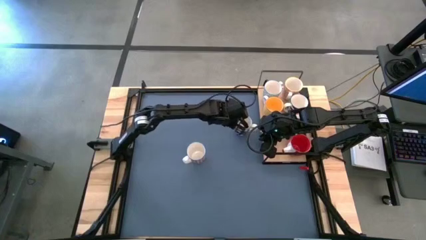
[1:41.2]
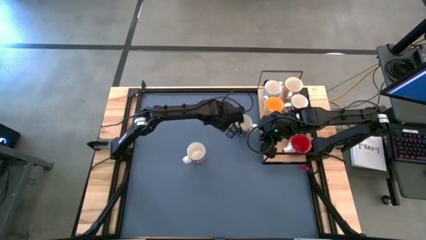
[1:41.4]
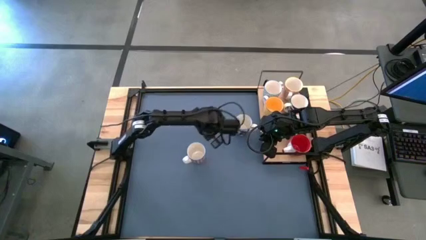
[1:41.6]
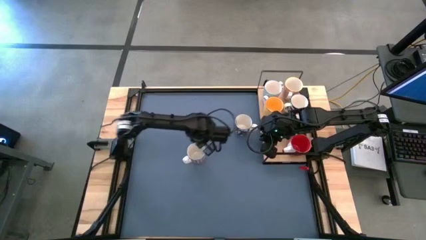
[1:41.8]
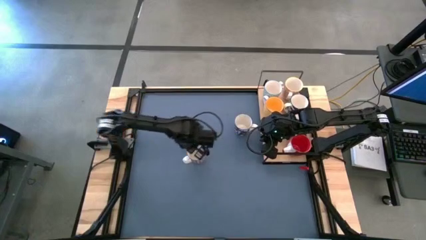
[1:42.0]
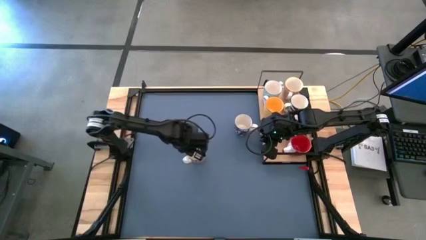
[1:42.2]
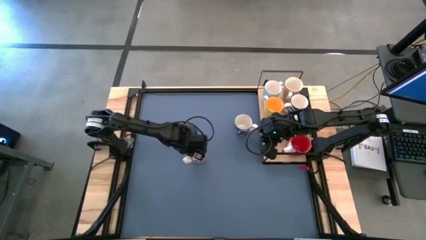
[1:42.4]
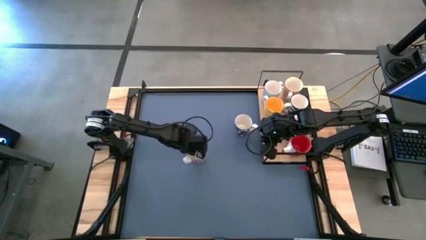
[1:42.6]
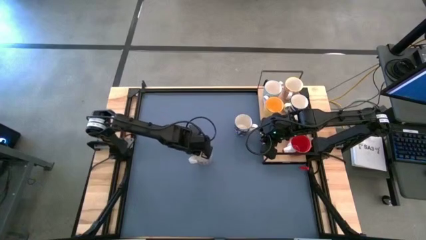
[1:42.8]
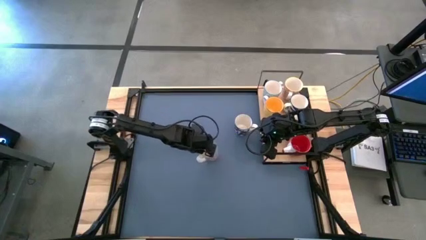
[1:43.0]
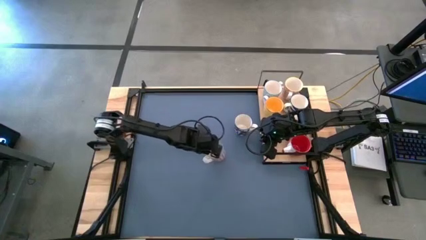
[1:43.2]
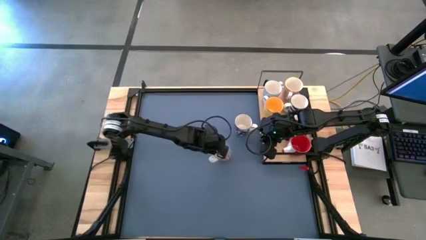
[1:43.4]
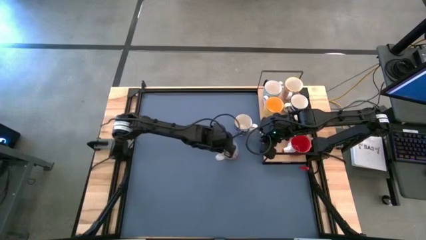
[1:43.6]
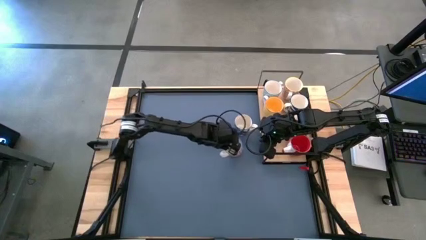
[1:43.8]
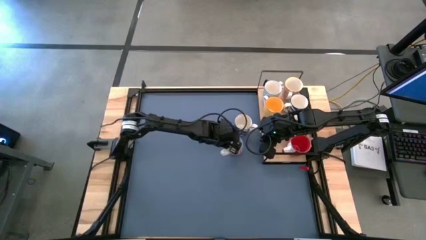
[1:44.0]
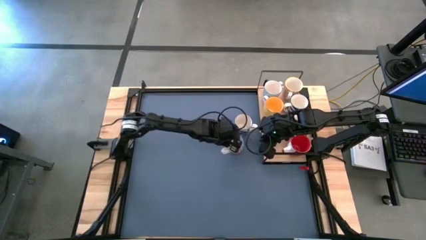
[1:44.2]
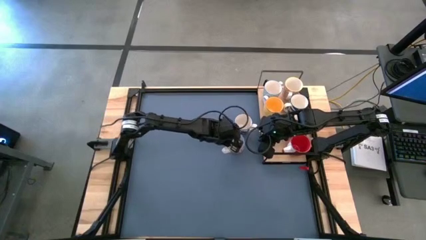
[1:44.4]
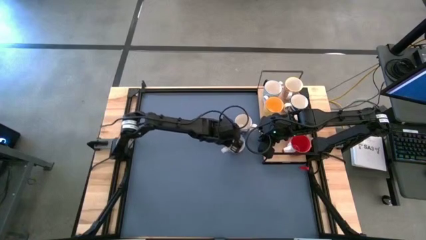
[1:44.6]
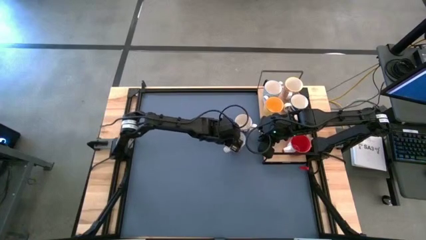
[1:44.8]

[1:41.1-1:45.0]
Task: Place coffee mugs
Move the red and white cup to the top right of the table

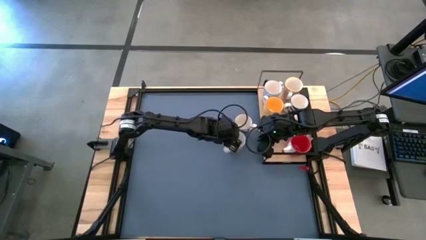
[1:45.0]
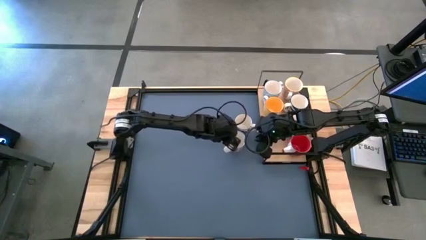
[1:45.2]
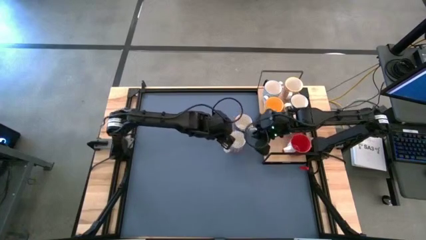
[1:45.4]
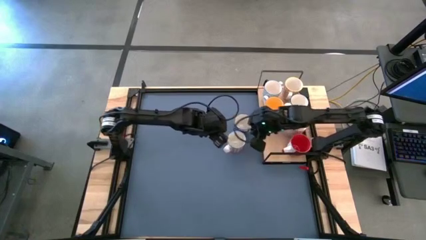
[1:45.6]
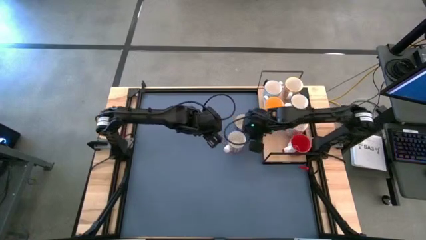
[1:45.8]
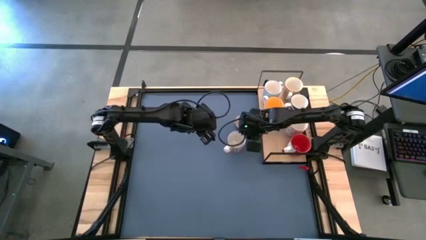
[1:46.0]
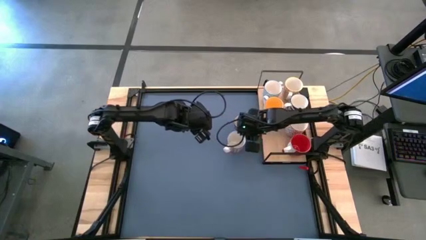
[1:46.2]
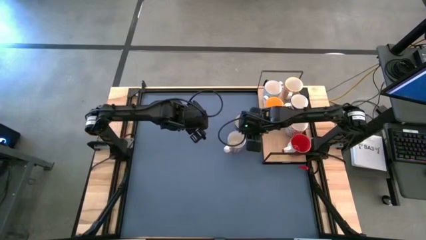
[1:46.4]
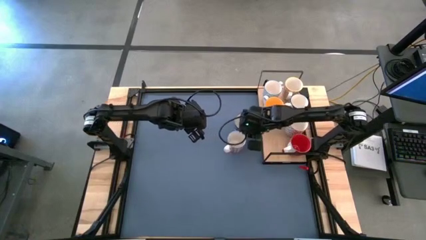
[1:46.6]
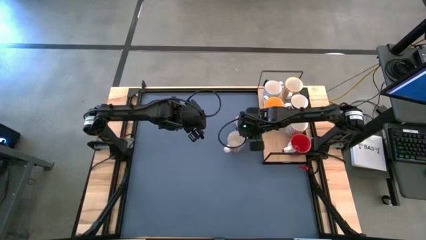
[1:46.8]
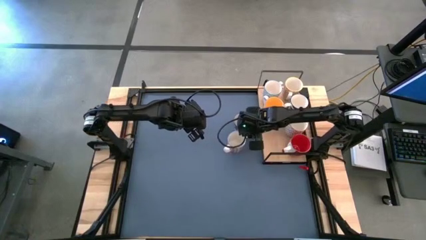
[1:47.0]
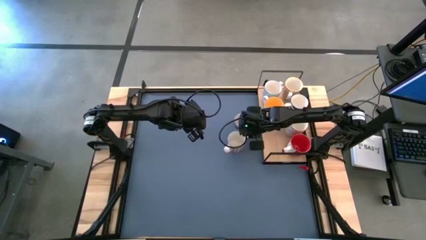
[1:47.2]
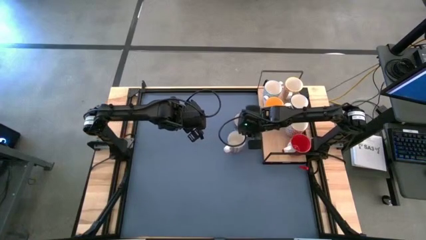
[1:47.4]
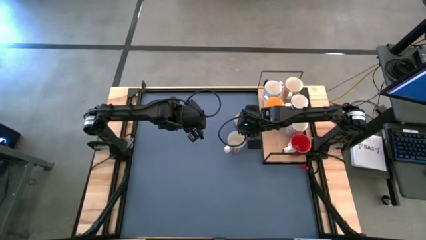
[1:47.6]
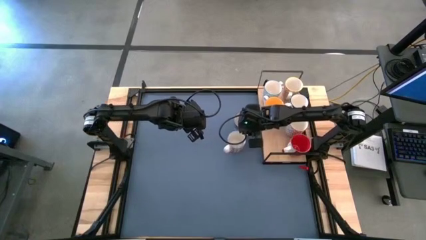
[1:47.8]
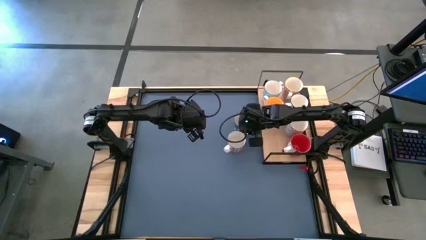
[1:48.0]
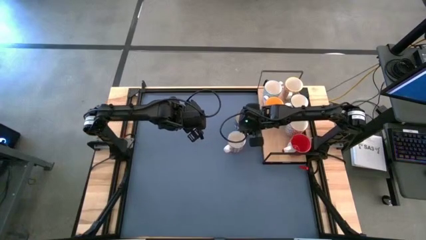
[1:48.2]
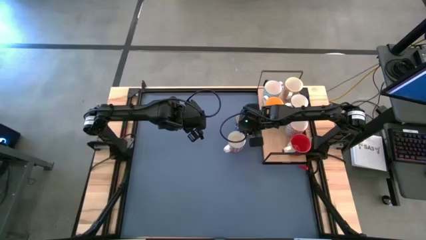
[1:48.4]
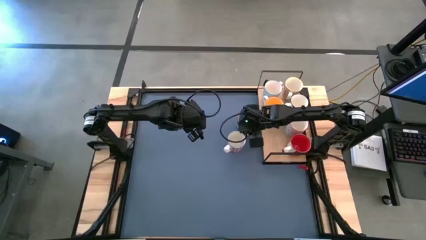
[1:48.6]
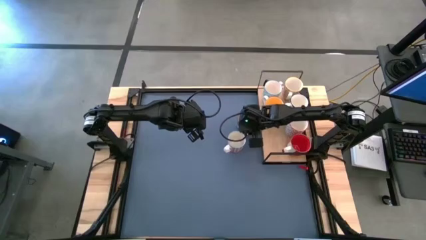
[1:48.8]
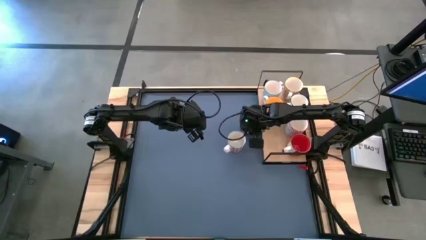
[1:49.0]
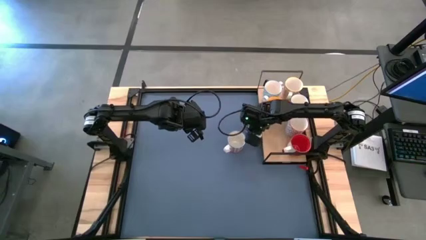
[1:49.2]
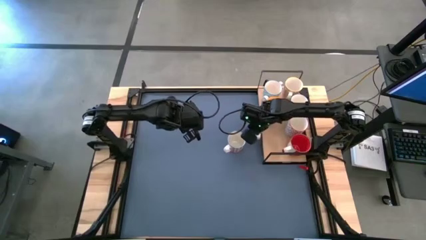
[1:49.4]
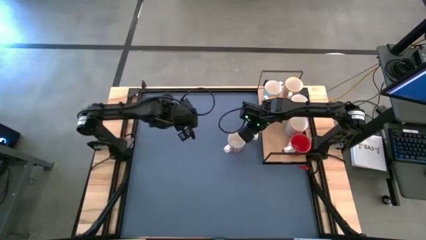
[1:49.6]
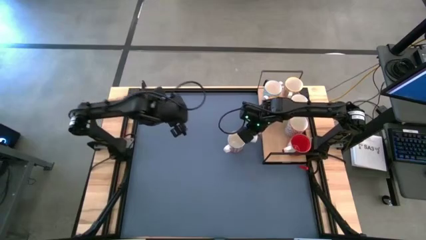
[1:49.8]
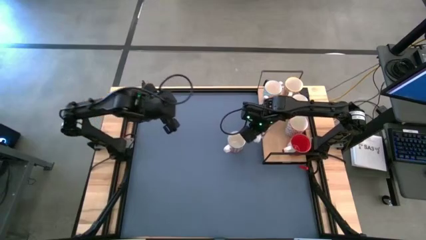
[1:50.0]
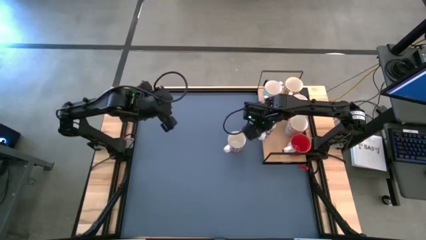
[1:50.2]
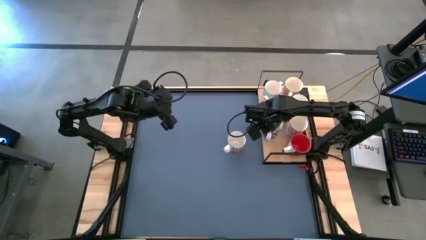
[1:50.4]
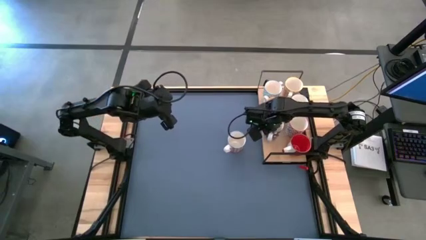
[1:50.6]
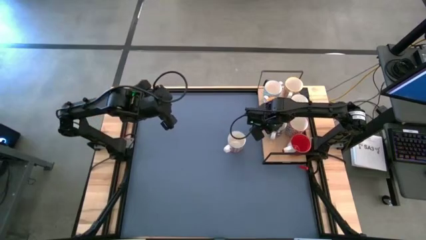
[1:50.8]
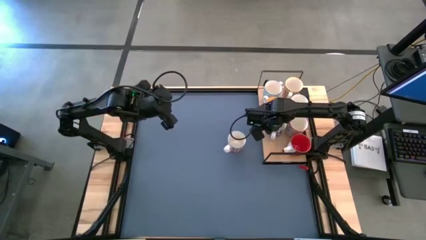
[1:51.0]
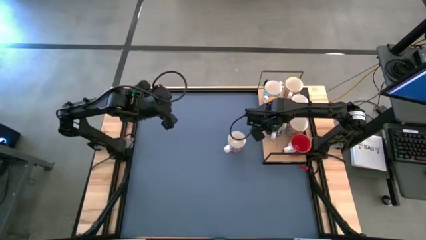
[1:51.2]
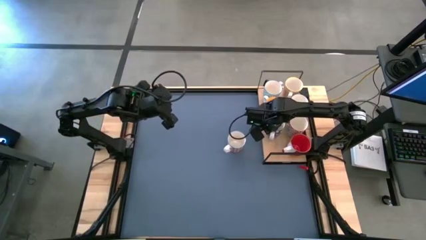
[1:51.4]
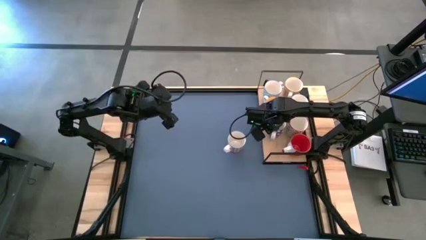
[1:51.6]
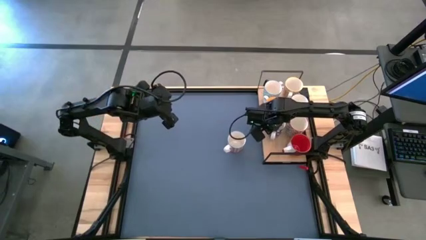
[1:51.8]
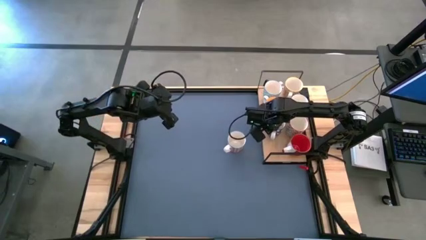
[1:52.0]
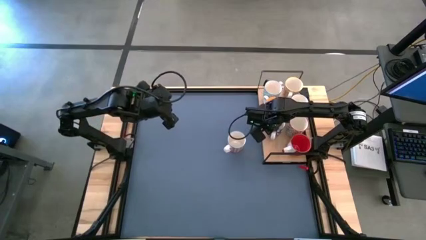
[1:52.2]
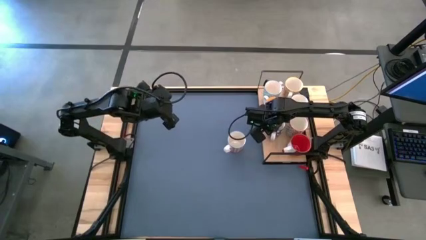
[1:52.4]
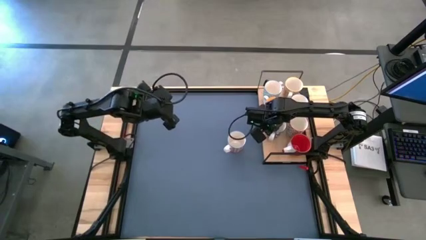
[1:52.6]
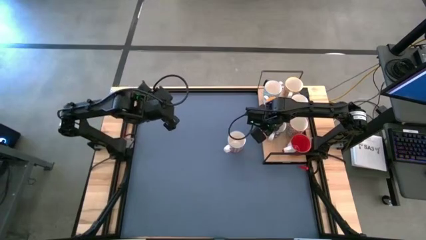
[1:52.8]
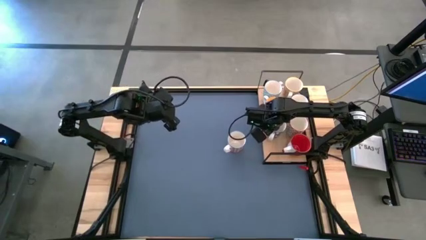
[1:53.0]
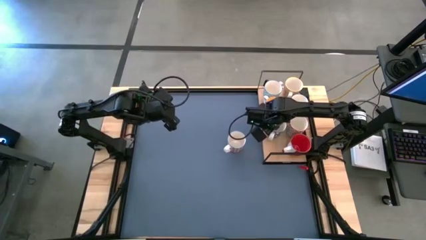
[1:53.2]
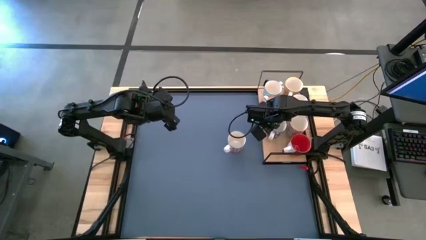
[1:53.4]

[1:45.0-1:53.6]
Put the blue cup on the shelf aligned with the gray cup

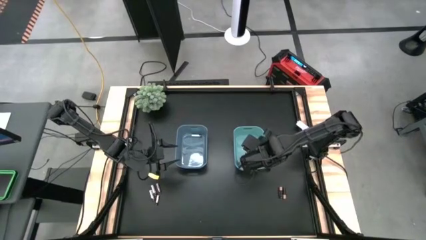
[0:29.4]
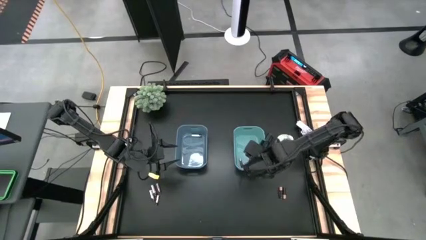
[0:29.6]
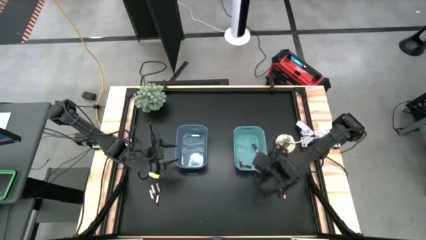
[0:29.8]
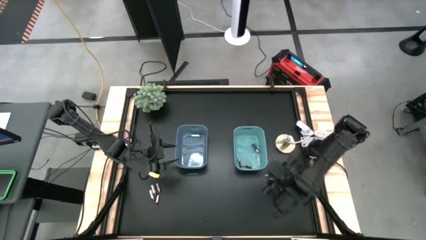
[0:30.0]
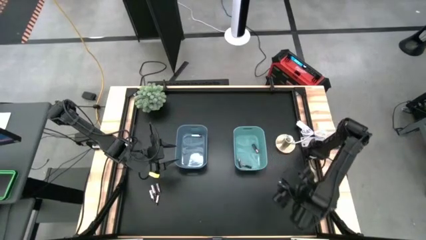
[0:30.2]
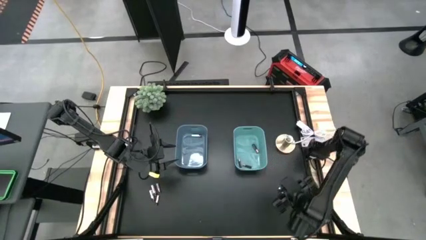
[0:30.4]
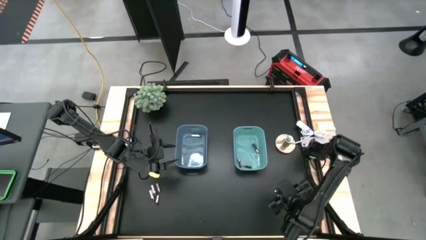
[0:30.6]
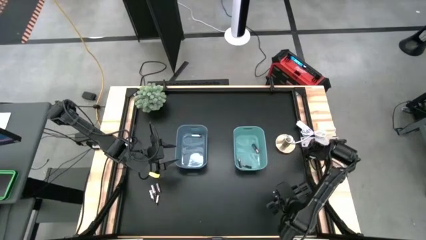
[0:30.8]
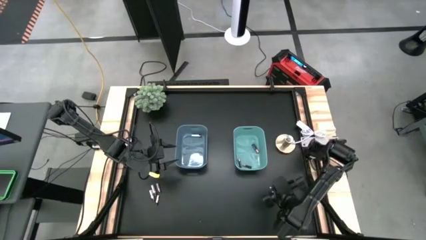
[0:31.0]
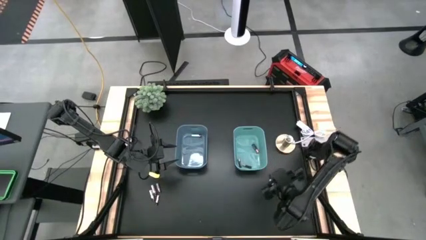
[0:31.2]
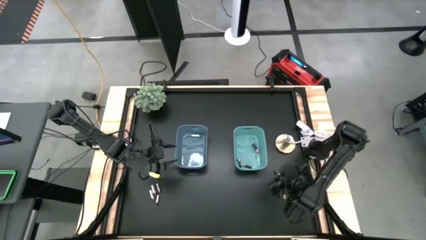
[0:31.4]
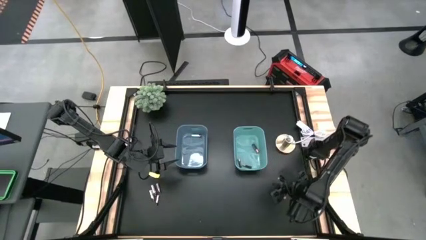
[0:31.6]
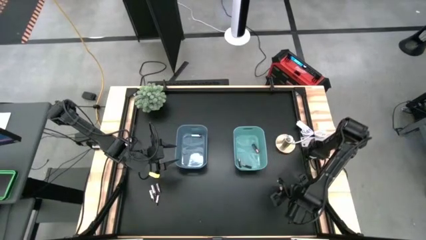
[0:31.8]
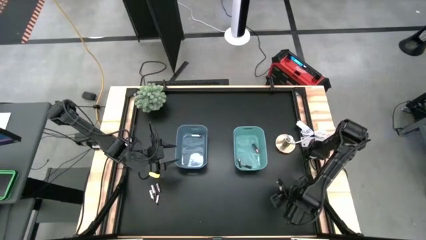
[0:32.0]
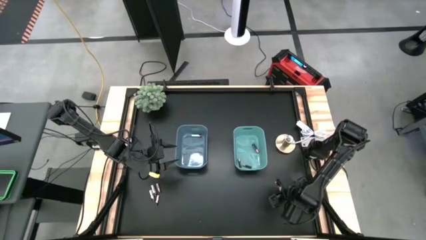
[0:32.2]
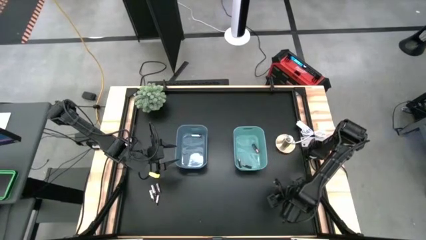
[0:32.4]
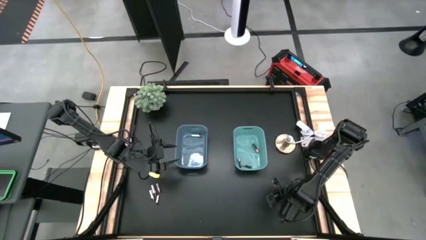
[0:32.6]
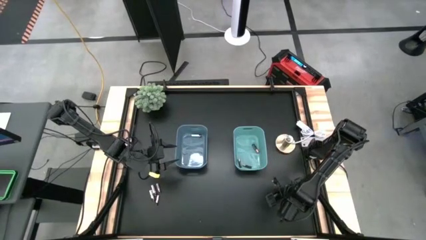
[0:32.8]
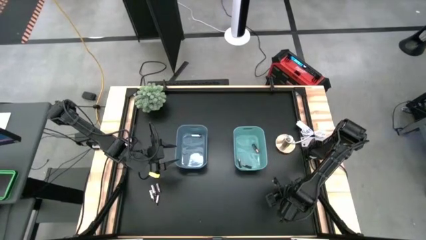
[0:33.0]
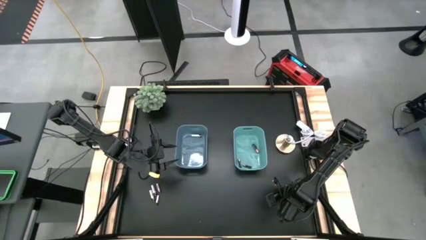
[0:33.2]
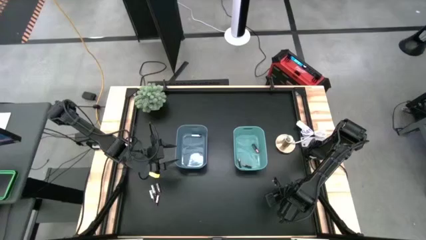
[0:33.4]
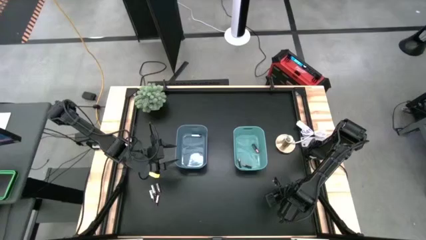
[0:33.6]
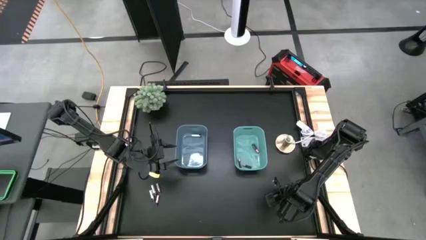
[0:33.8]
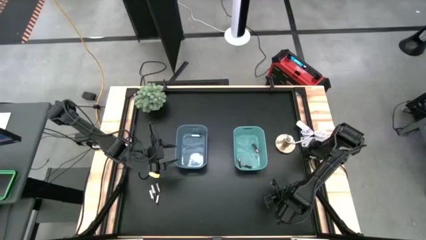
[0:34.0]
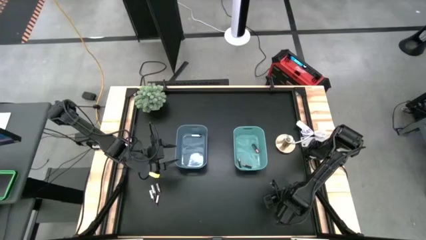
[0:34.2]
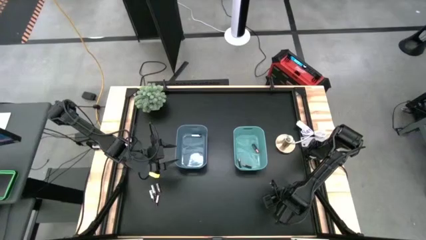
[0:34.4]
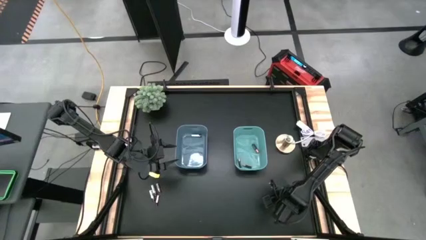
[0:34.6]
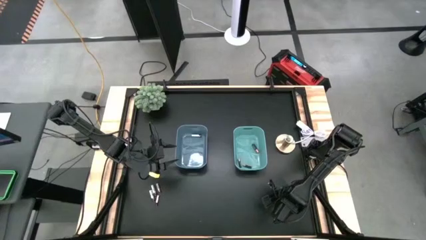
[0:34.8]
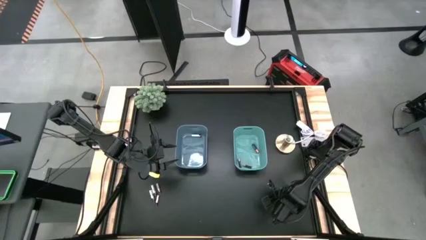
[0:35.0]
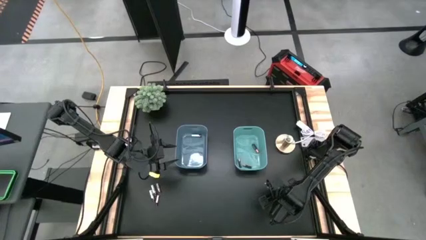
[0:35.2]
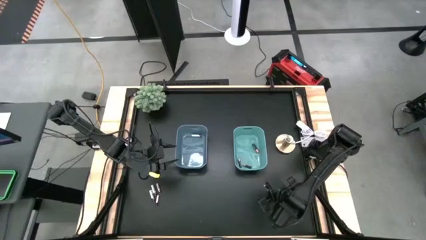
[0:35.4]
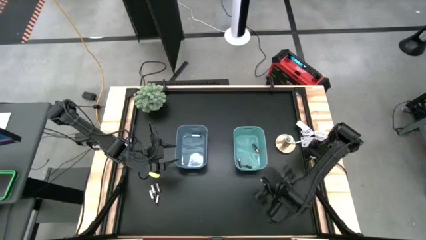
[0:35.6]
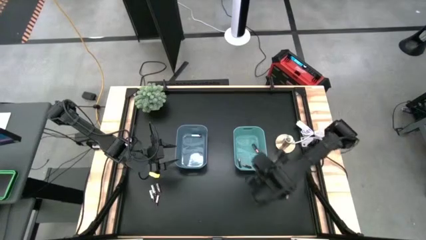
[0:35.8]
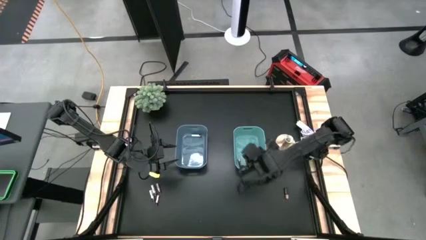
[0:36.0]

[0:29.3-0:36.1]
Task: Sort batteries
Put the big black battery into the green bin
